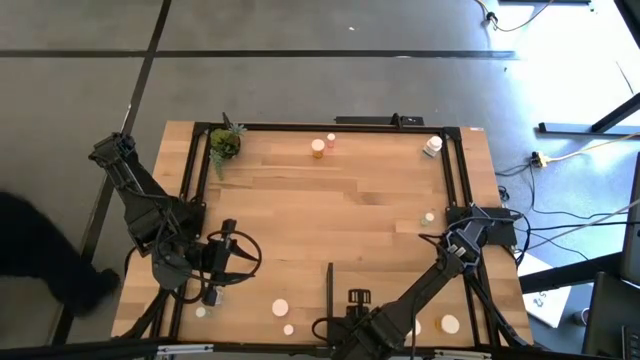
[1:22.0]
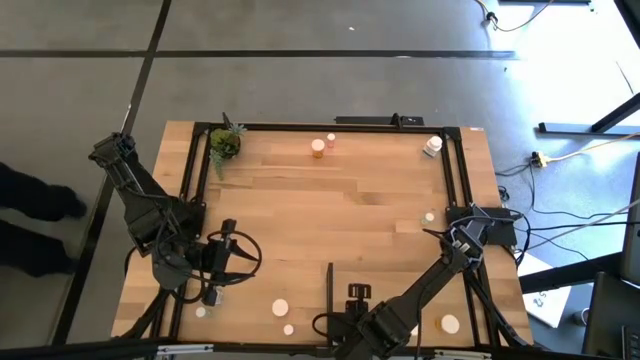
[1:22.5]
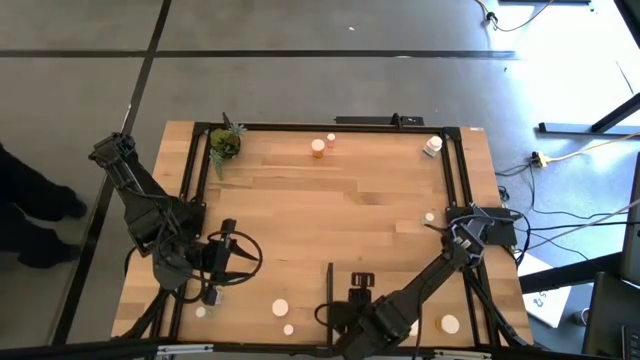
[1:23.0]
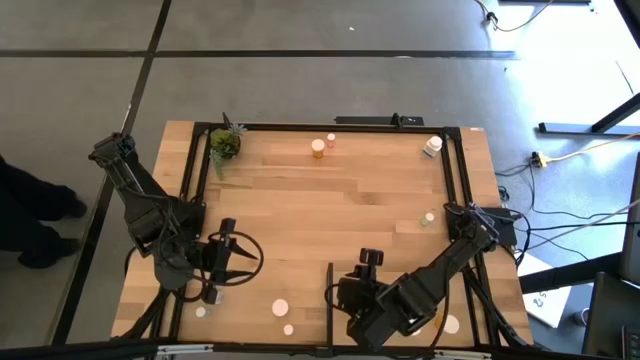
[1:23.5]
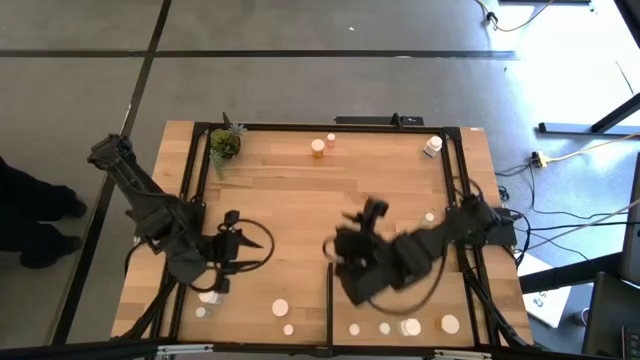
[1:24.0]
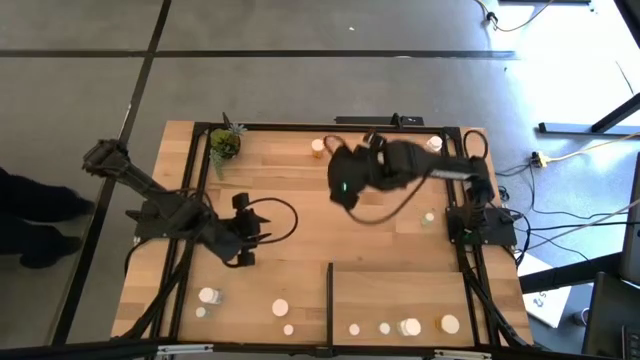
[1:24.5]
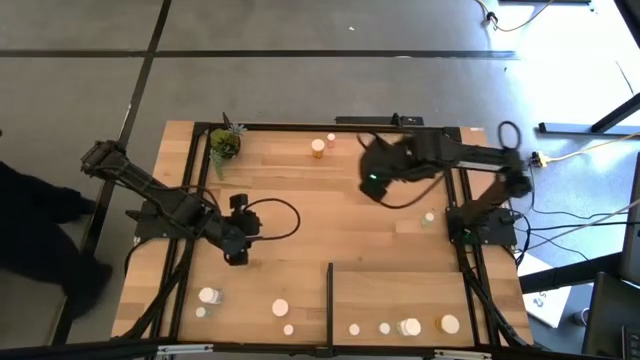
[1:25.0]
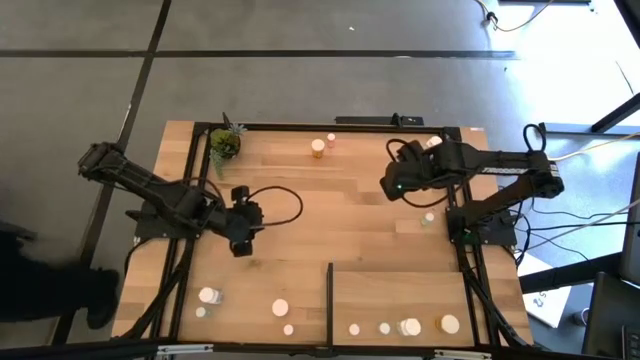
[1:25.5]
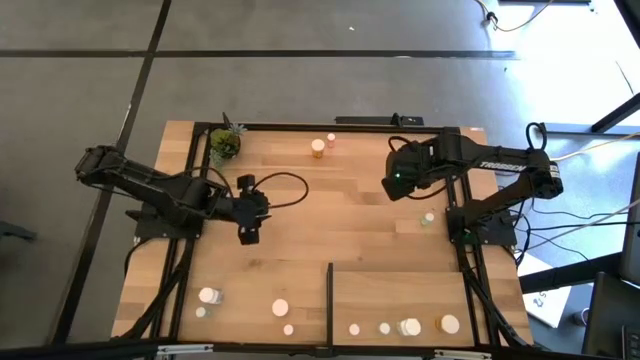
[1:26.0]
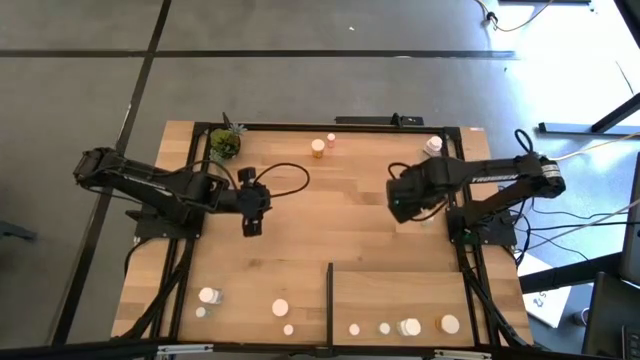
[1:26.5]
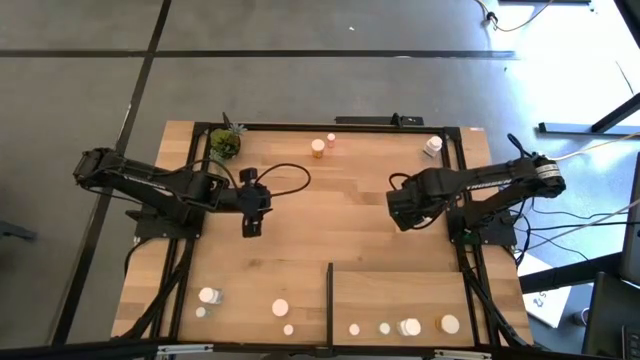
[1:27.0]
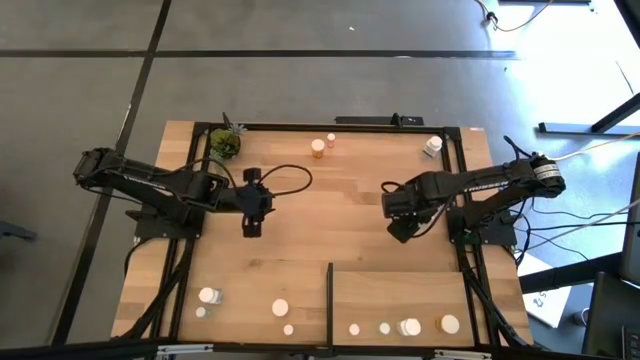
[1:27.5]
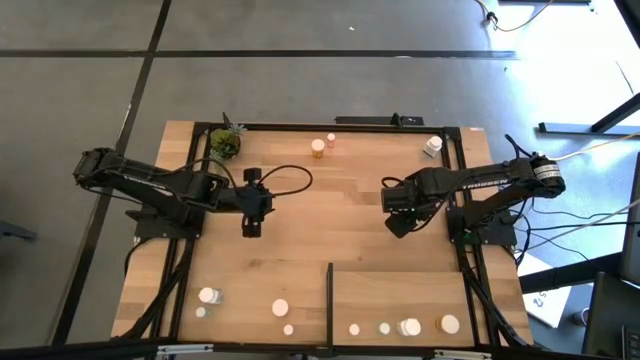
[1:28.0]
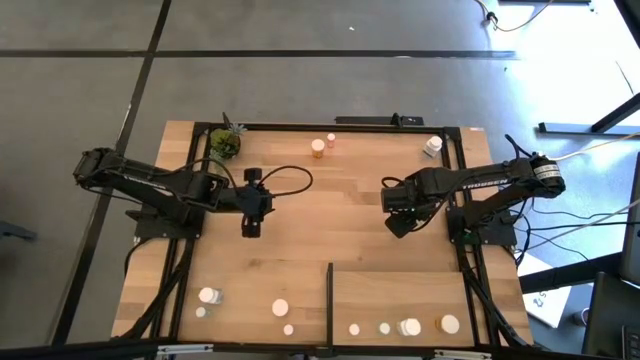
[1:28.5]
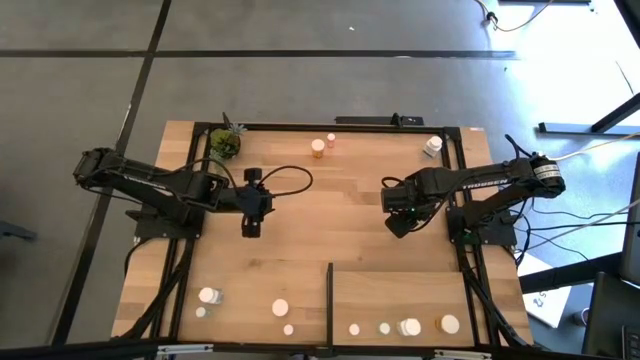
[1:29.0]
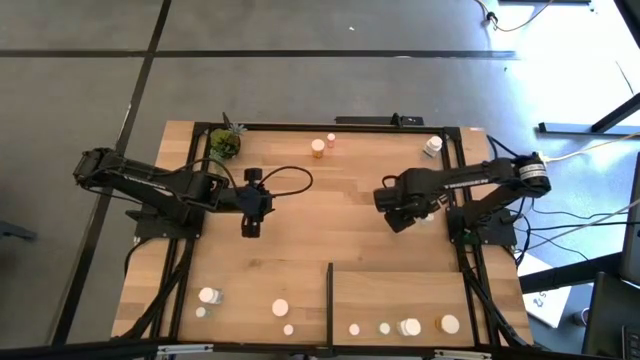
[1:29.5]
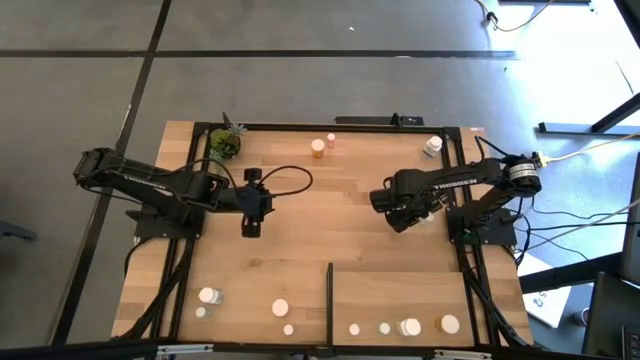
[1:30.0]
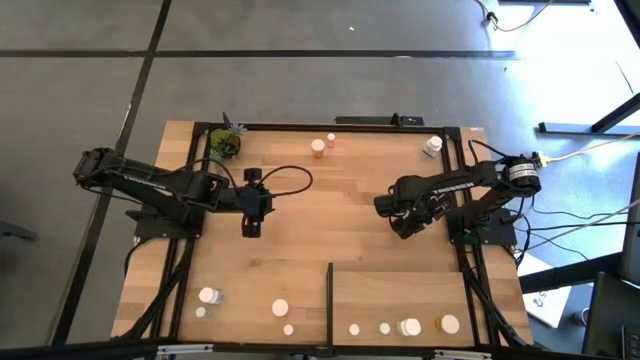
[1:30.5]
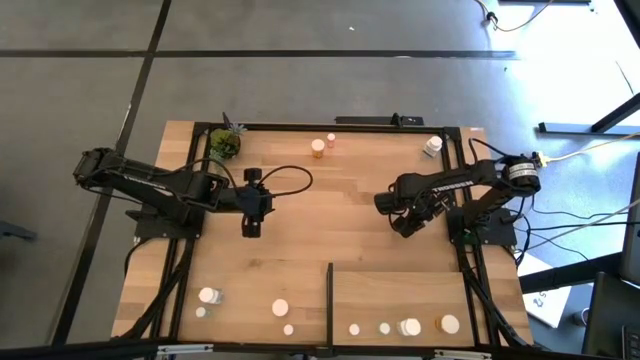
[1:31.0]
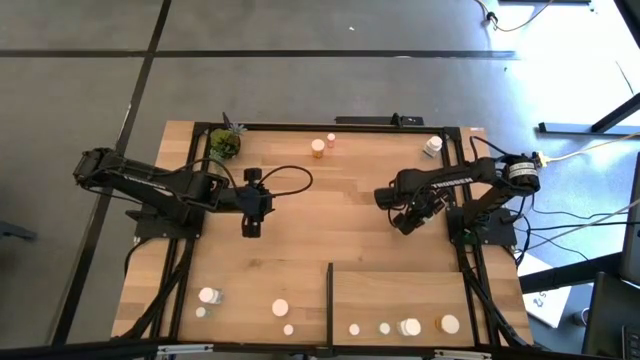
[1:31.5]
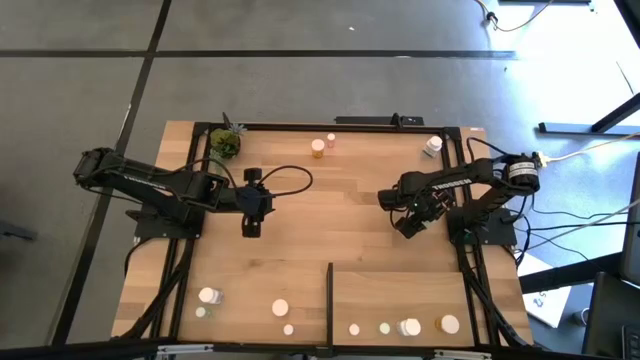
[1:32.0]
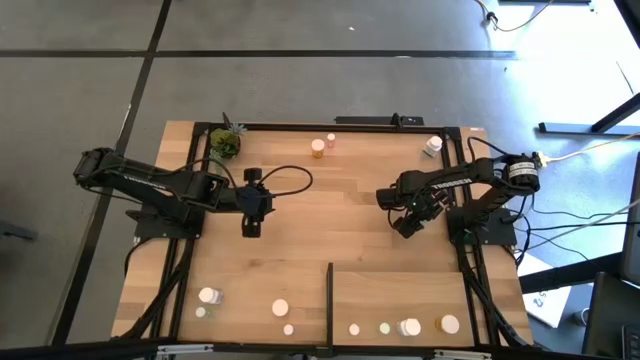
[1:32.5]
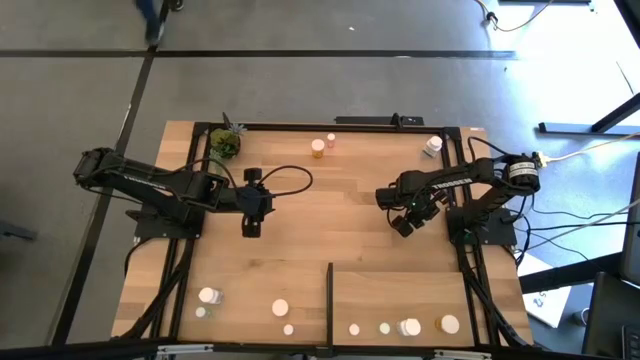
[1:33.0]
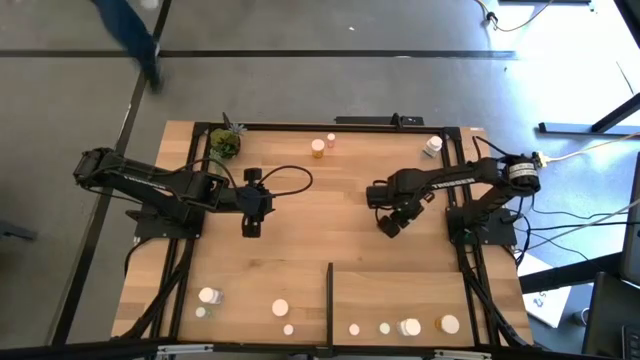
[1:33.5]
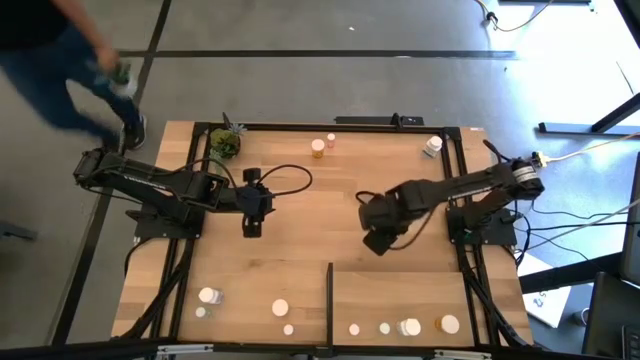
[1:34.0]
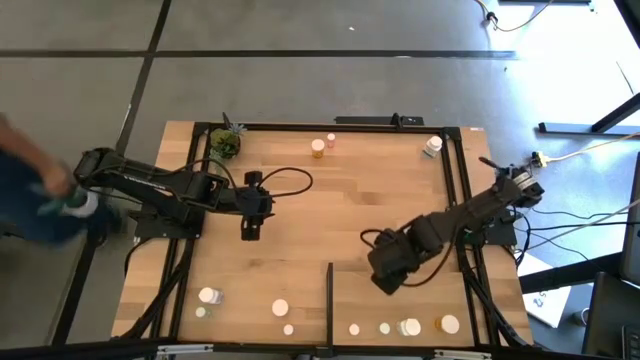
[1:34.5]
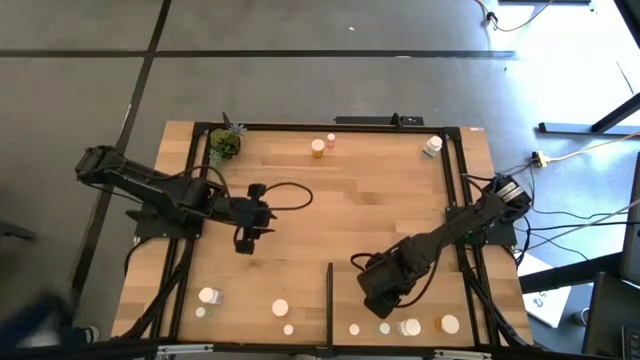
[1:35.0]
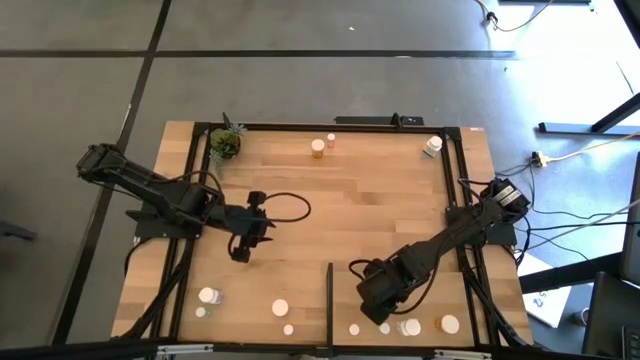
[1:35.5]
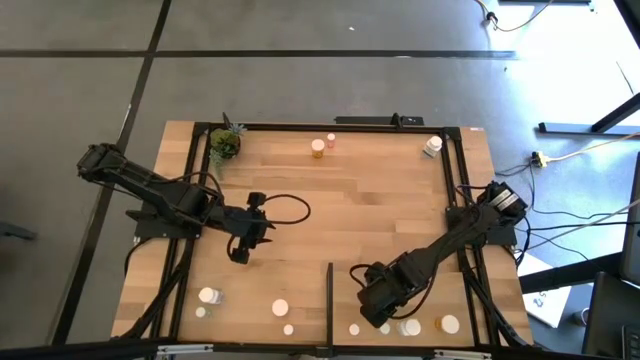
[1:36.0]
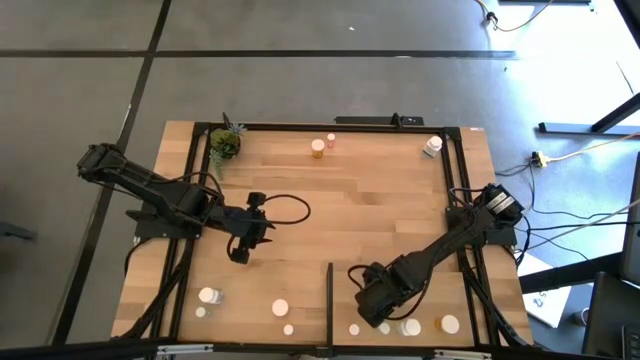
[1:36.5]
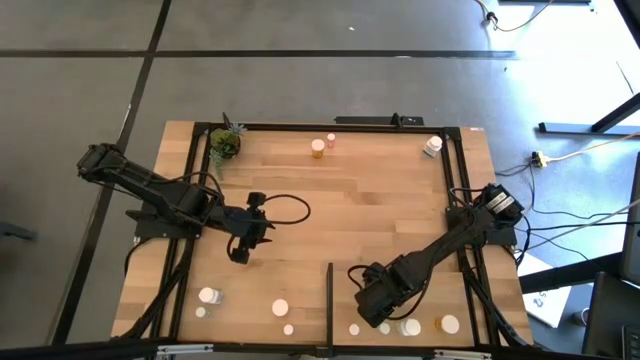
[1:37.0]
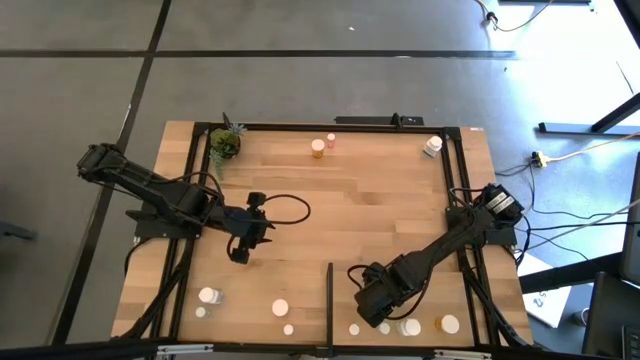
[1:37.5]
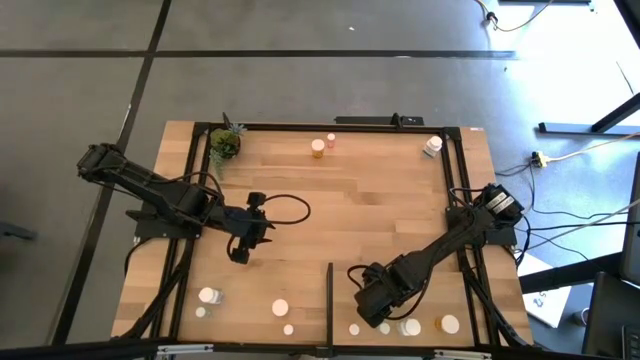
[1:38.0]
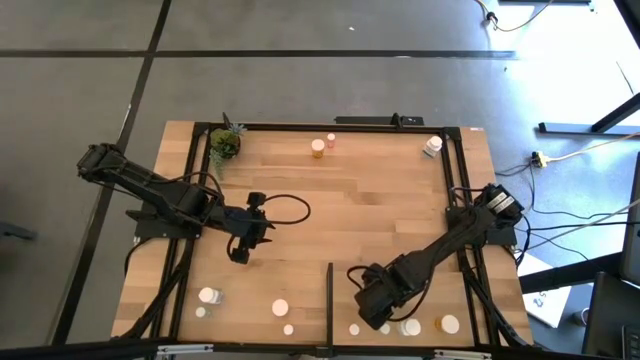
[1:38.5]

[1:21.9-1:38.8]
Task: Pick and place medicine bottles onto shelf by color
Put the top blue pill bottle on the shelf aligned with the other blue pill bottle

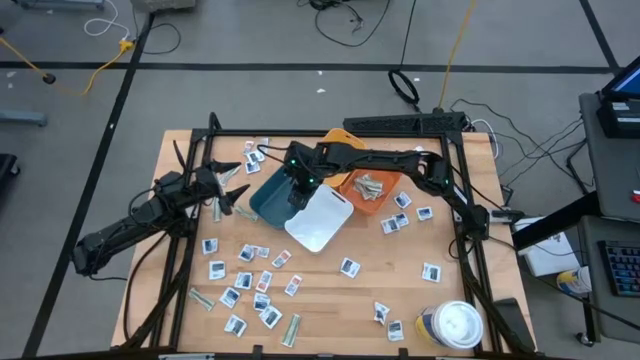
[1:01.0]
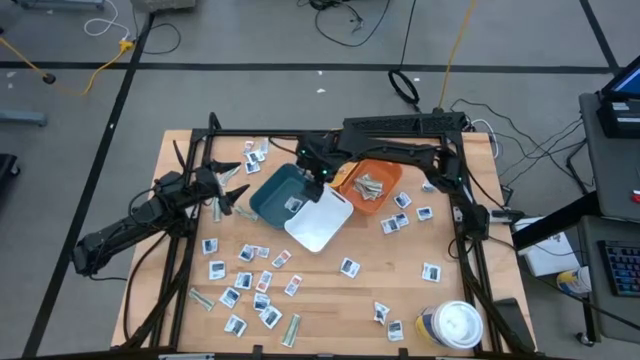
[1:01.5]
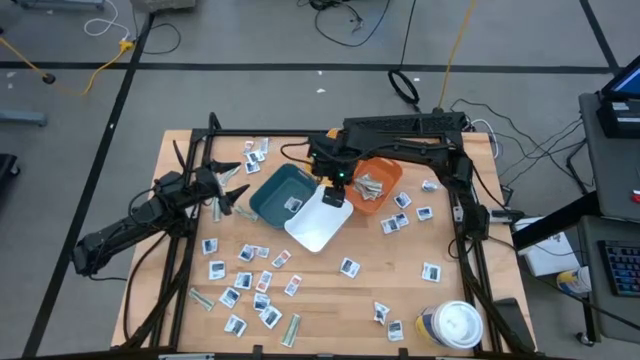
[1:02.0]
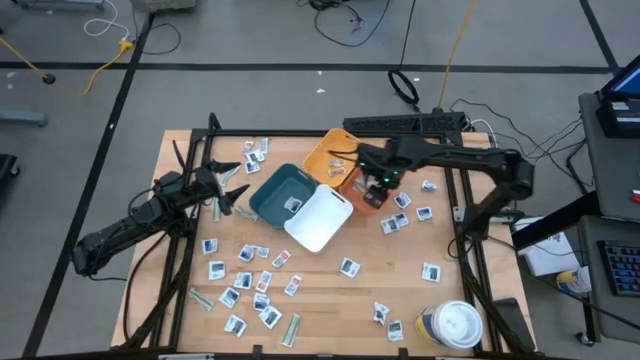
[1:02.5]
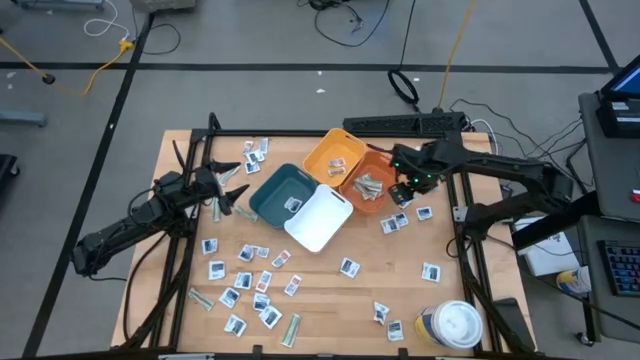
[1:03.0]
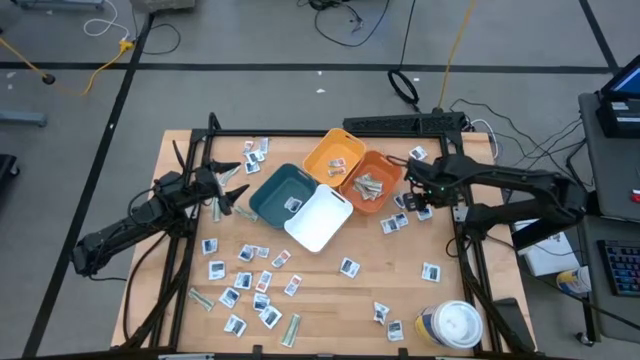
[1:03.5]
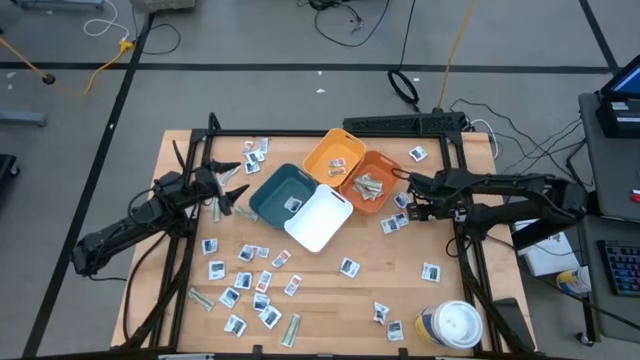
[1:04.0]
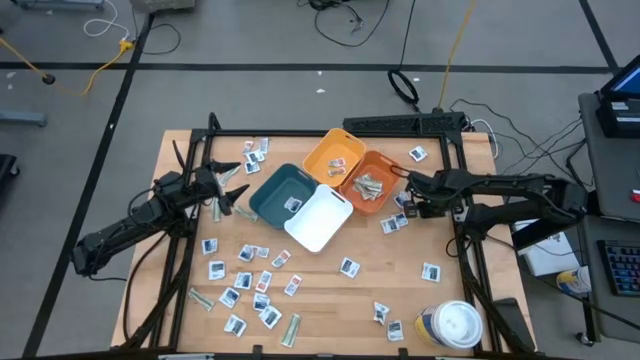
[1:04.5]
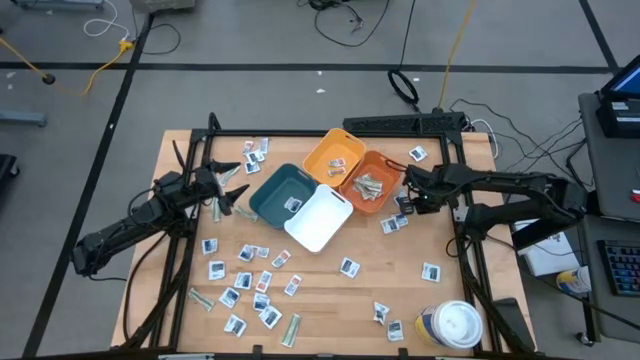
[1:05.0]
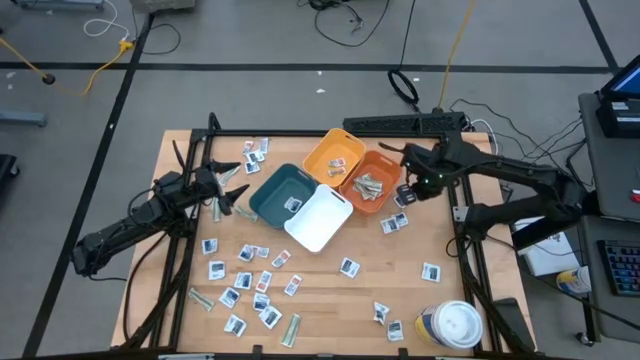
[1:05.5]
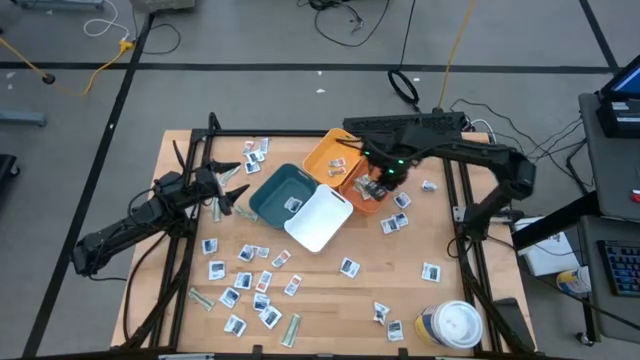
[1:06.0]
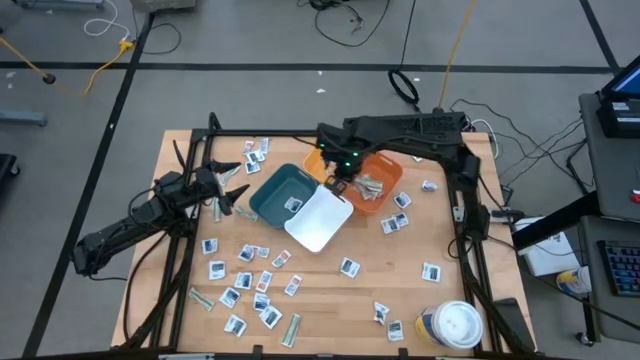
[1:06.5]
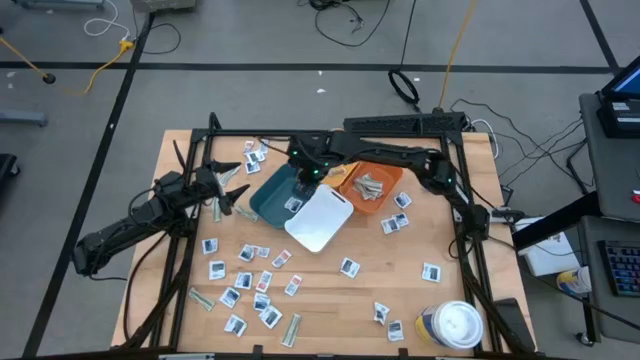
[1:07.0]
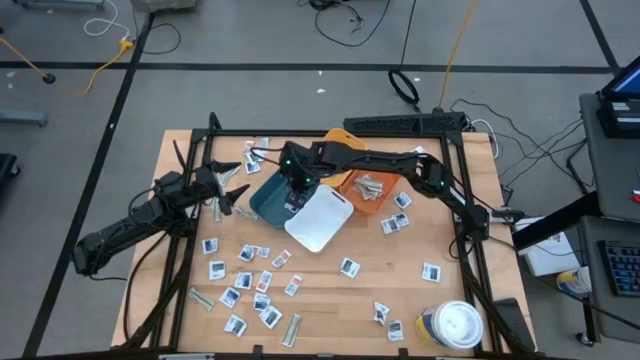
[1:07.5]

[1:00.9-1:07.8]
Task: Pick & Place First Aid Supplies
Put the blue alcohol pad into the blue bin
